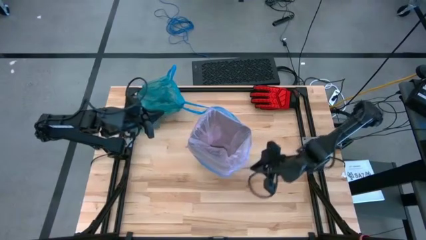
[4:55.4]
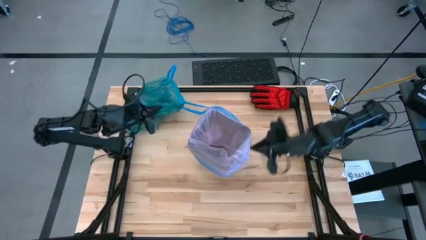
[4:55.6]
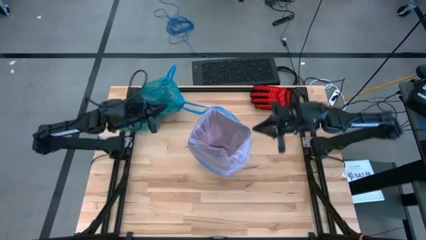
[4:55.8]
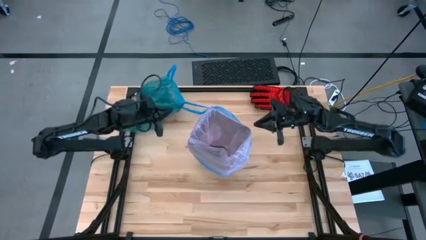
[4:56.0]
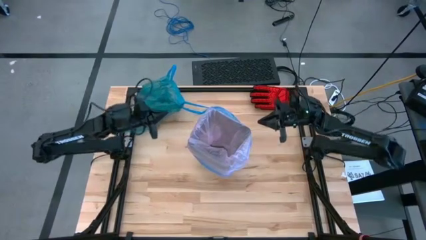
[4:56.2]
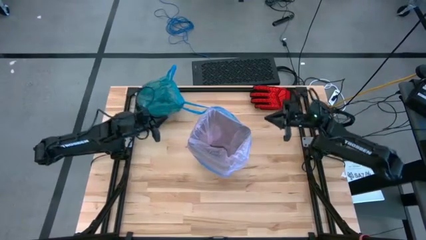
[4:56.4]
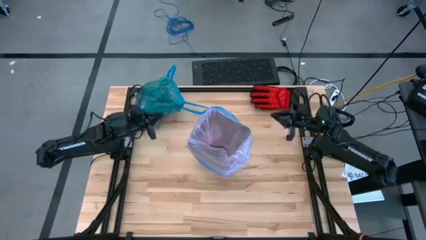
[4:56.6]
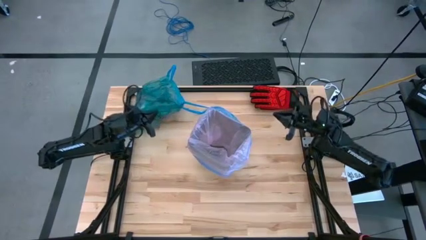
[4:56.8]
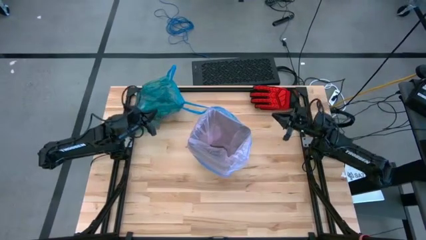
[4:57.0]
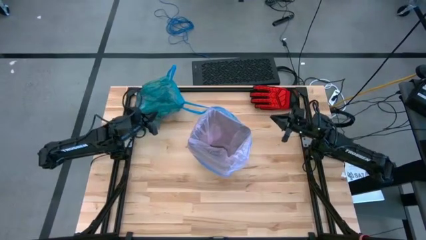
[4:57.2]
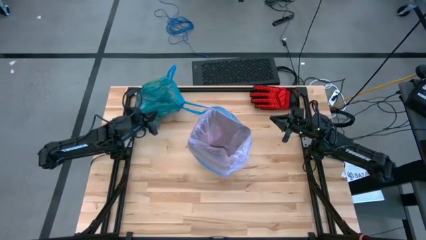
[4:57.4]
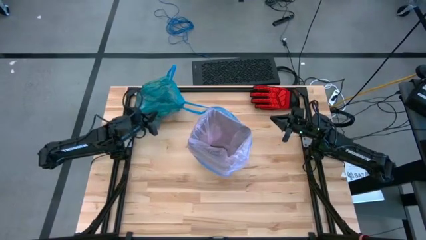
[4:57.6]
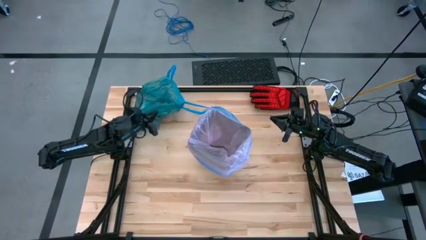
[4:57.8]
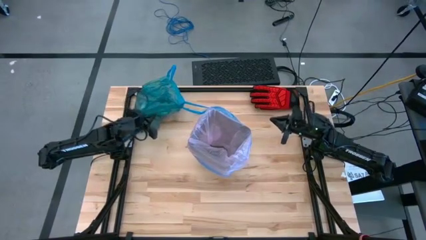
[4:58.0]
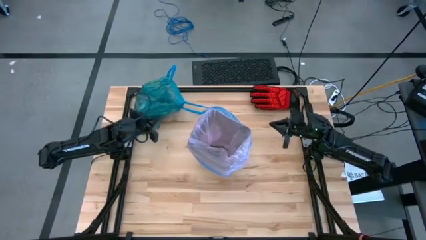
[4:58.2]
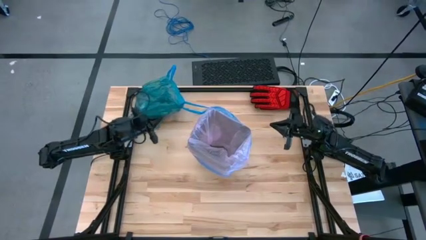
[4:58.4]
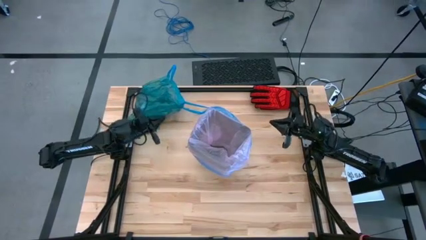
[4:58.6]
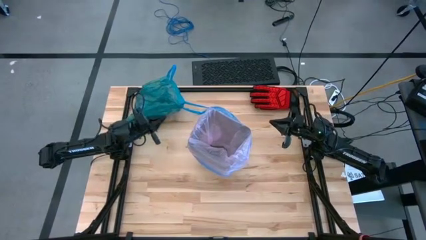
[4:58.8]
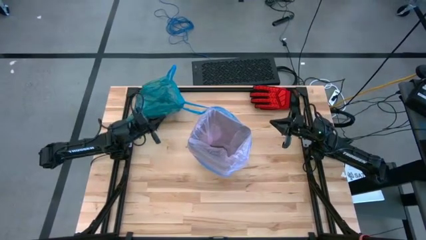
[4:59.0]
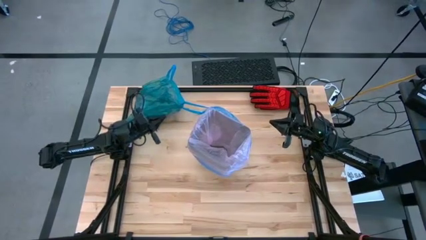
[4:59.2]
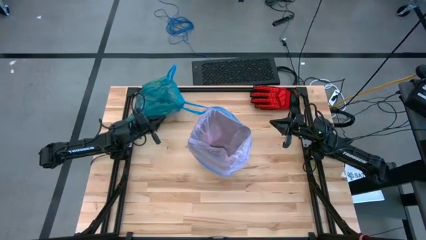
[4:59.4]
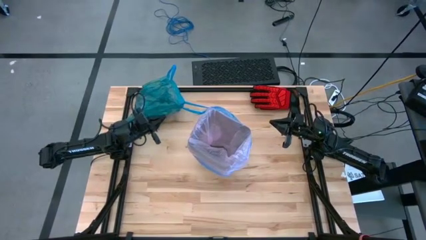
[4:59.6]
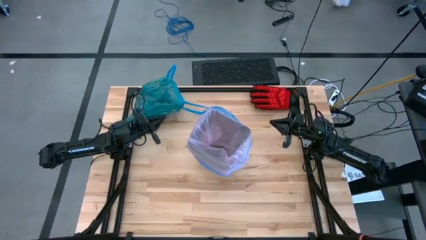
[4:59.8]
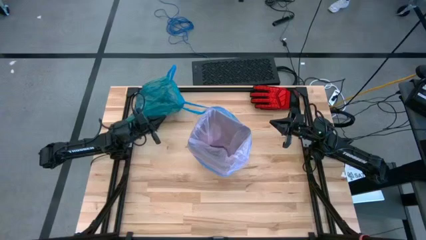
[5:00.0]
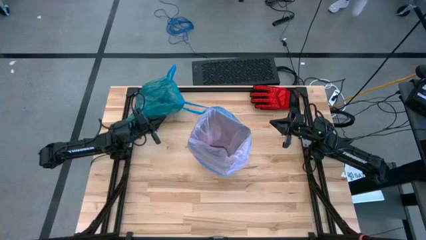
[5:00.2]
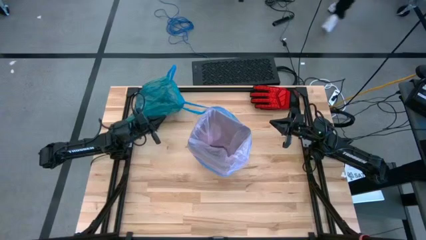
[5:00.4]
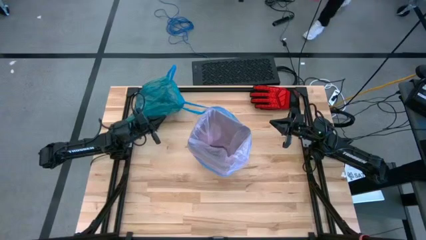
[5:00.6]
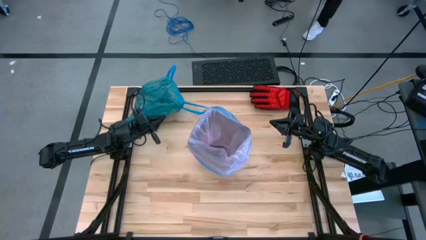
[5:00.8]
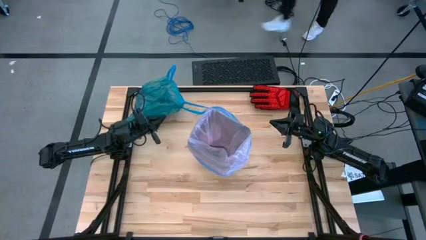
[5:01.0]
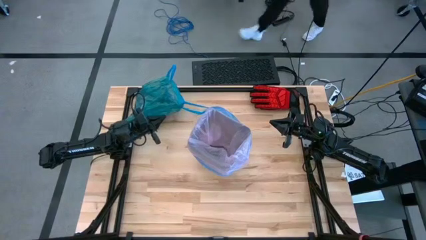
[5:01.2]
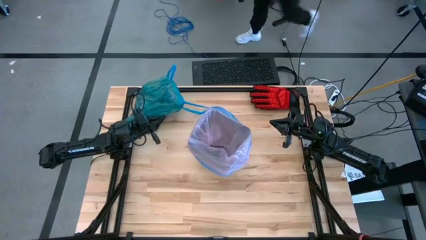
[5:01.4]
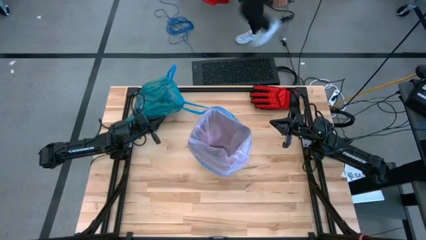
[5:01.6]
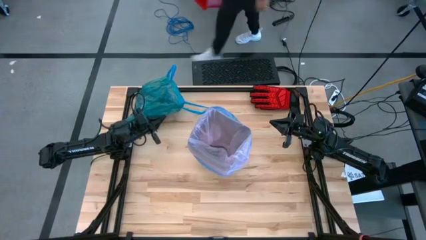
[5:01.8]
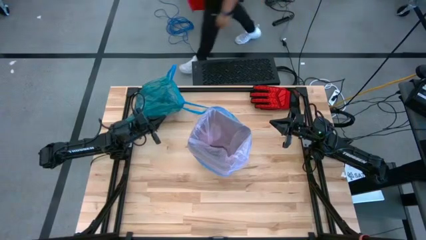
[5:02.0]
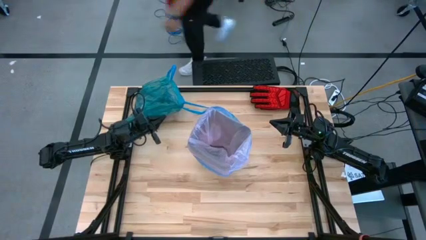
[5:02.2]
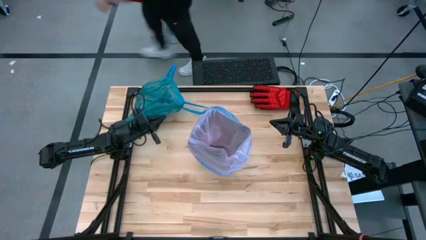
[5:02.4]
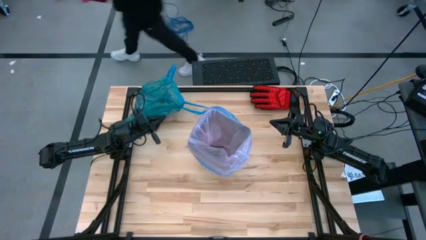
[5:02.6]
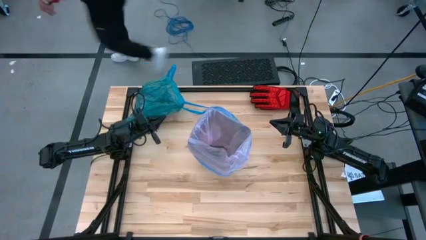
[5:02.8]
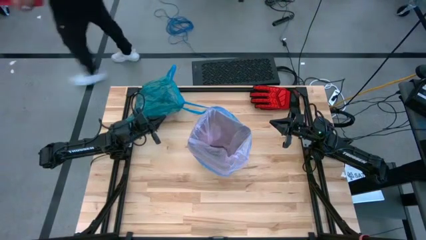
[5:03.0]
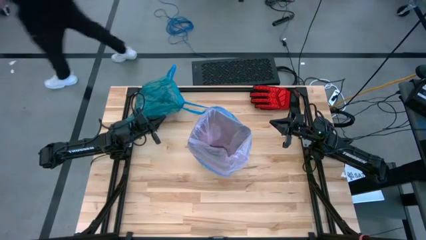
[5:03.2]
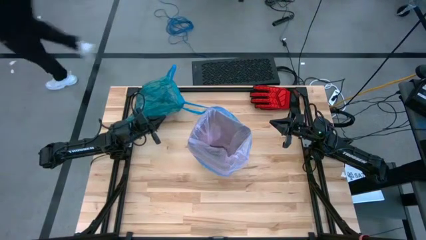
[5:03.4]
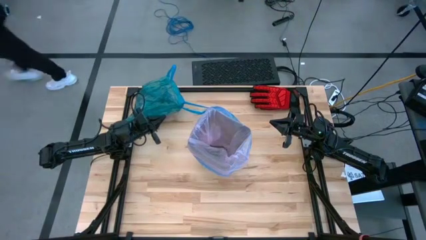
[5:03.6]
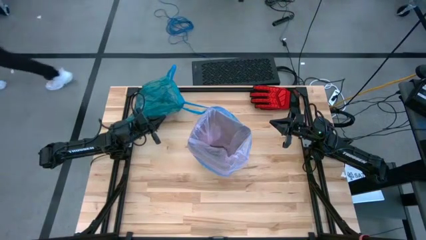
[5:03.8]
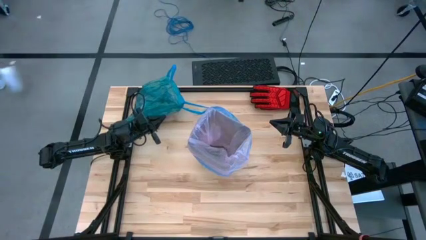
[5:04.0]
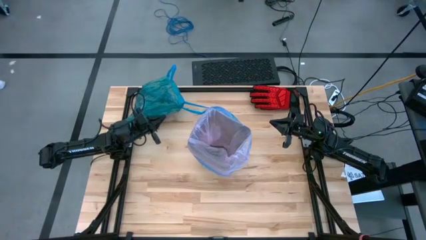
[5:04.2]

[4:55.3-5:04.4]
Task: place trash/remove bag and relplace
Return to Home Position

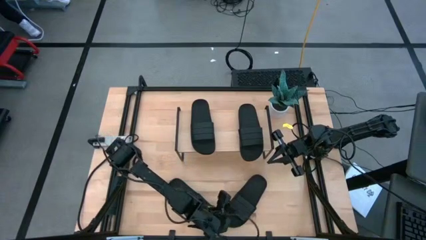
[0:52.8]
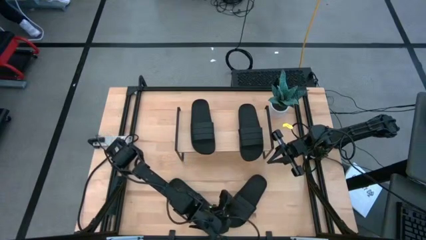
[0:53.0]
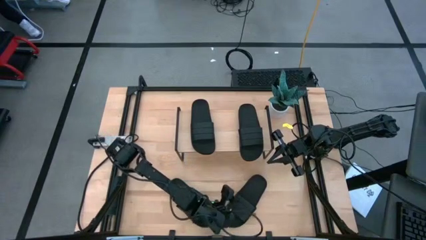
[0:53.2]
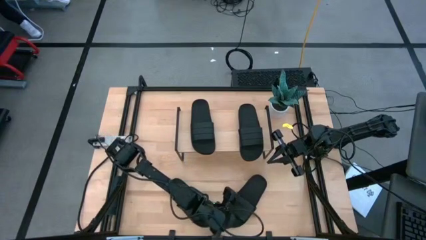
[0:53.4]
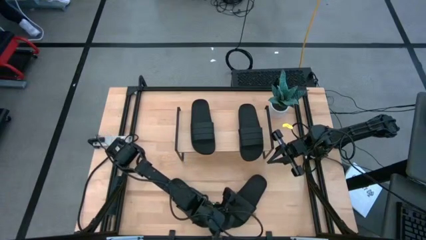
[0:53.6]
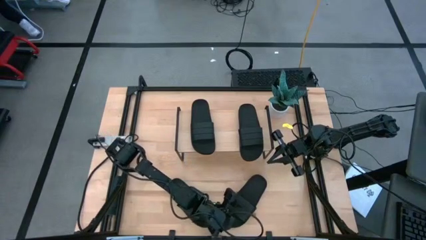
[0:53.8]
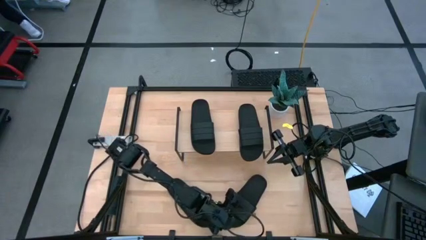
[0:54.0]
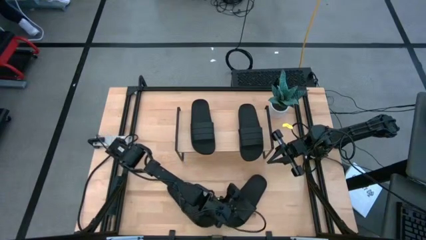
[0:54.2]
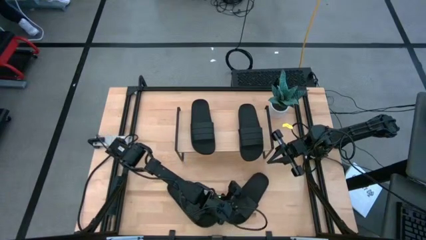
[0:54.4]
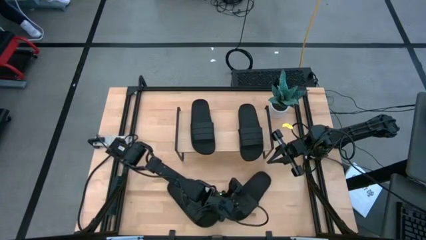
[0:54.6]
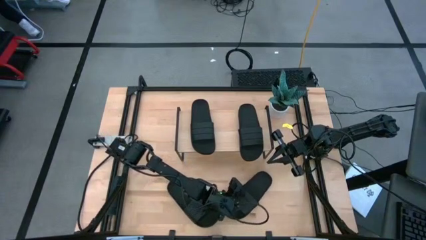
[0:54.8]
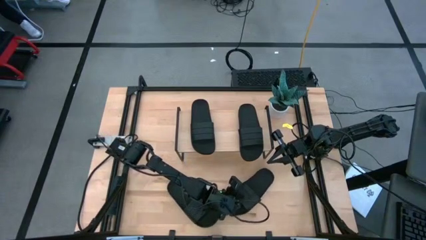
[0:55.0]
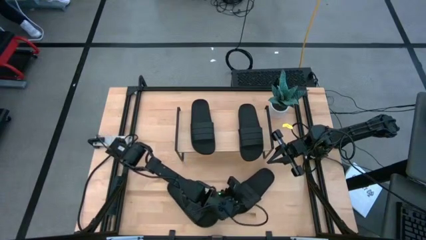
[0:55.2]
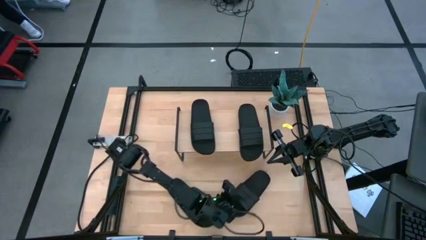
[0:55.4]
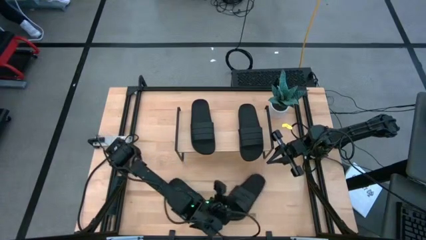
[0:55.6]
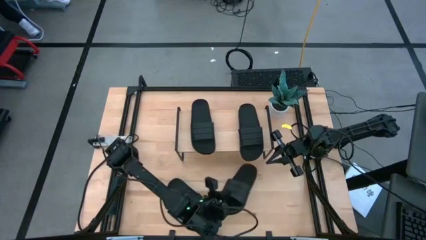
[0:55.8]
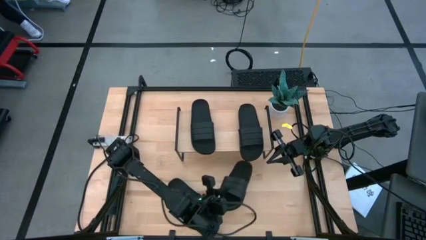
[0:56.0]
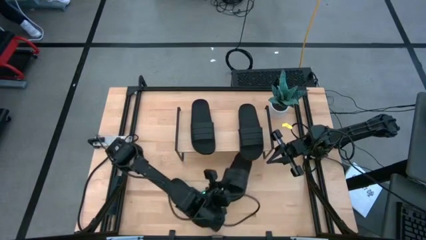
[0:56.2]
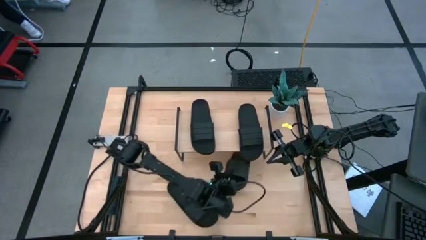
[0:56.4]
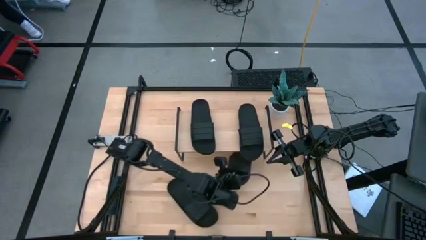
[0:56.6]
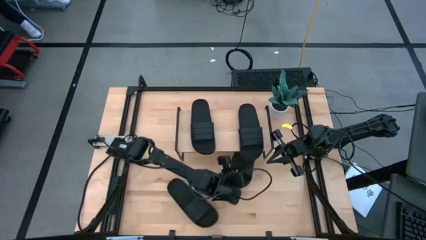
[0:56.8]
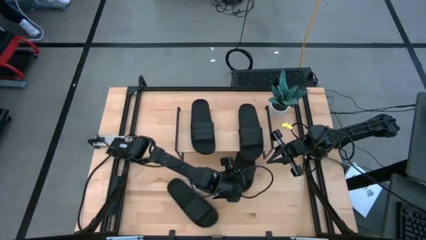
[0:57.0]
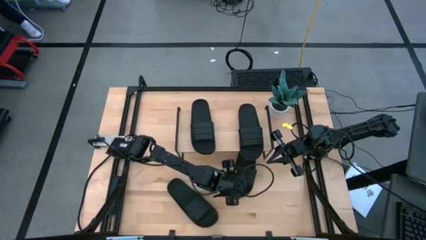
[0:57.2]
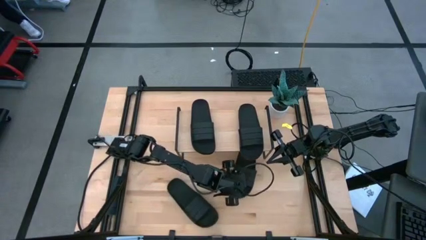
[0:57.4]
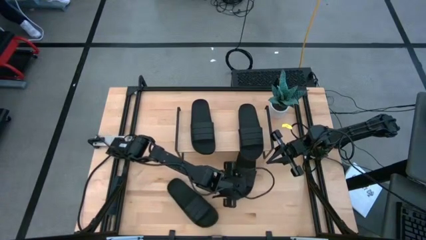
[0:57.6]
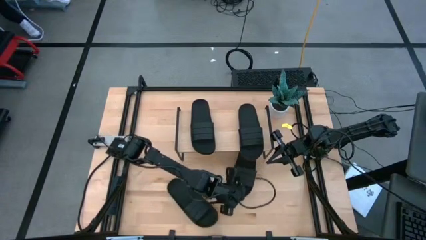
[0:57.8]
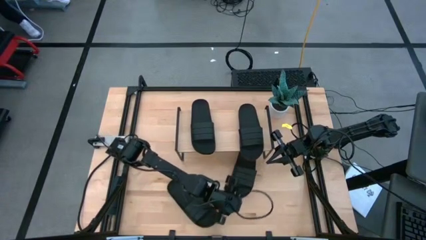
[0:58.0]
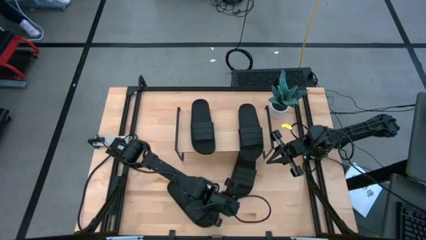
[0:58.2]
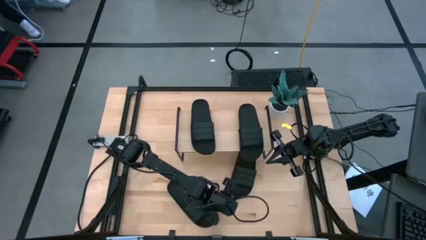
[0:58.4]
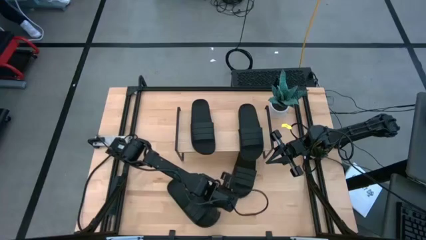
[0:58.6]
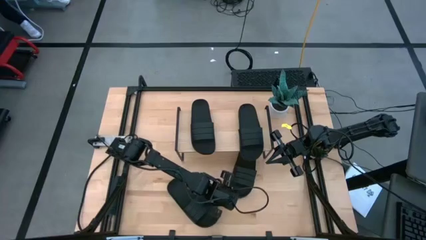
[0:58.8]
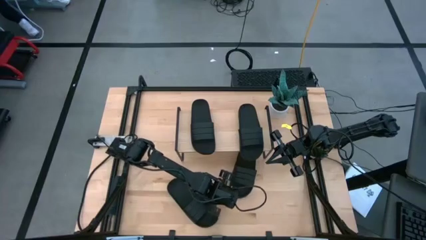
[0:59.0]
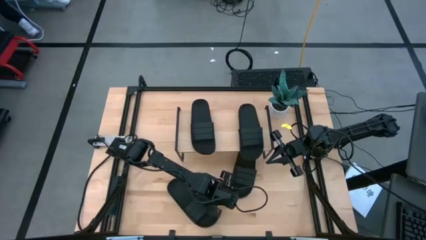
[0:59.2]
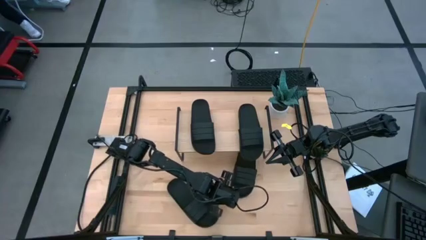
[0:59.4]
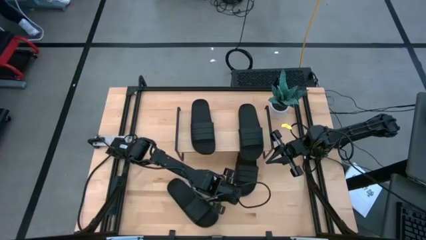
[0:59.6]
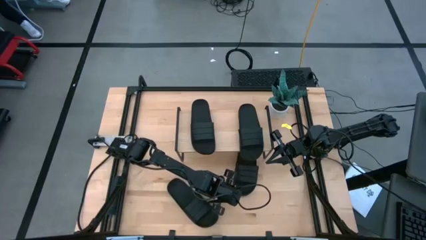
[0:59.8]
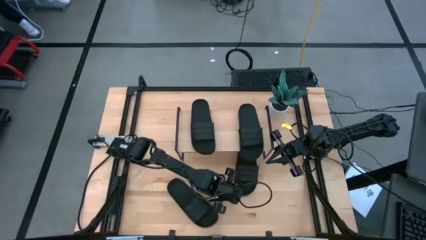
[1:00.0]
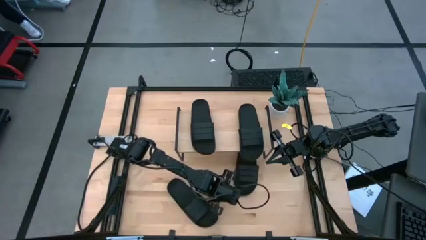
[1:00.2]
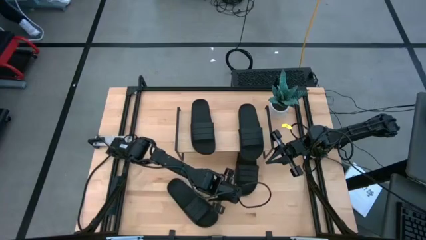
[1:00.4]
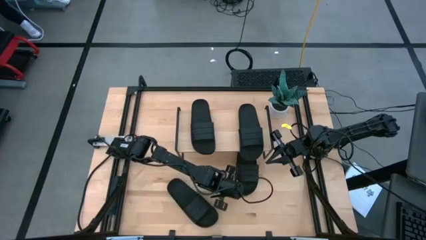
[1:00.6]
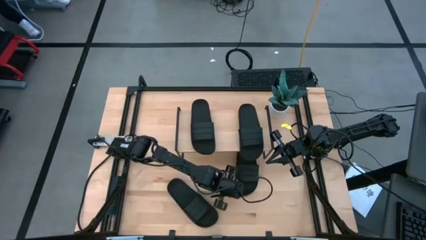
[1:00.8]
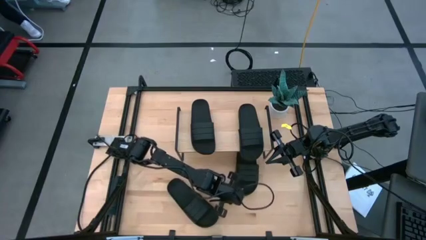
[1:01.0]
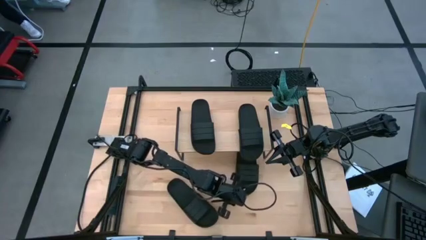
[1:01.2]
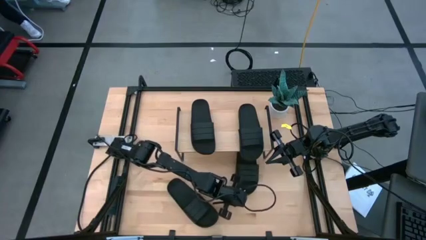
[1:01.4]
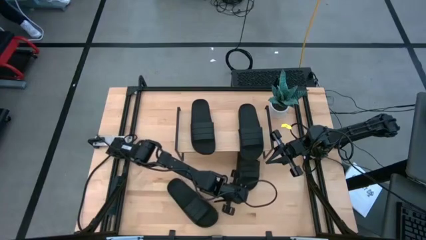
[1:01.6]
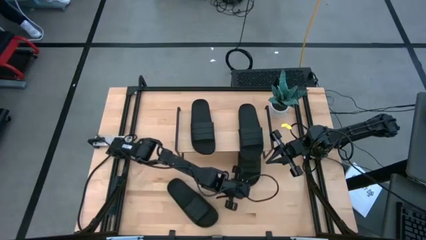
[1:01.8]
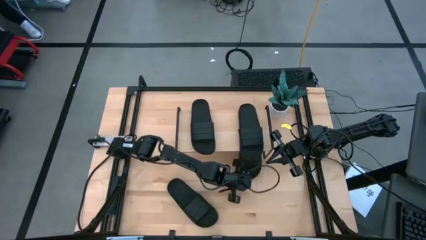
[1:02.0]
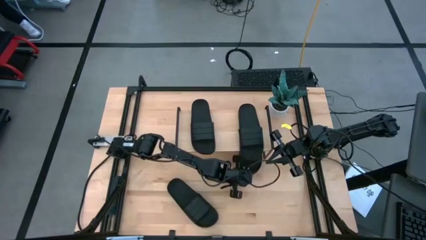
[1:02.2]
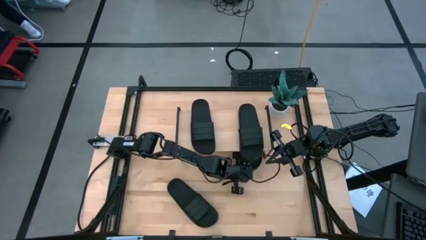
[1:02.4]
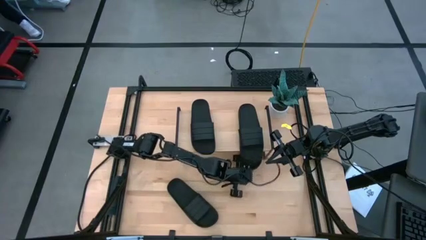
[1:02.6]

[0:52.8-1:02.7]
Task: Pick and place slides into the shelf
Put the right black slide under the shelf
